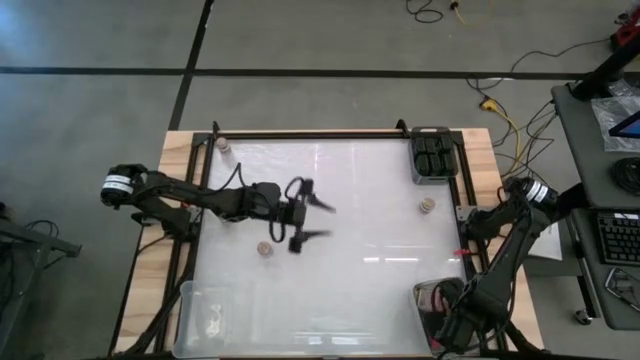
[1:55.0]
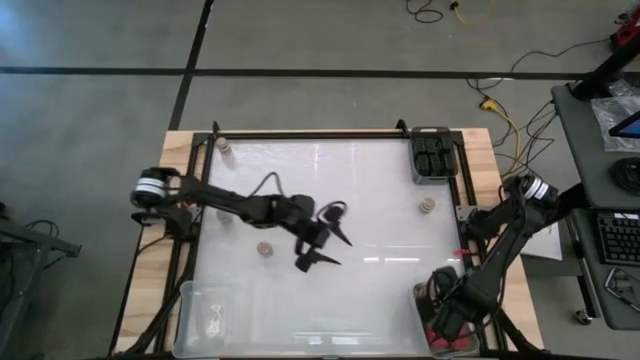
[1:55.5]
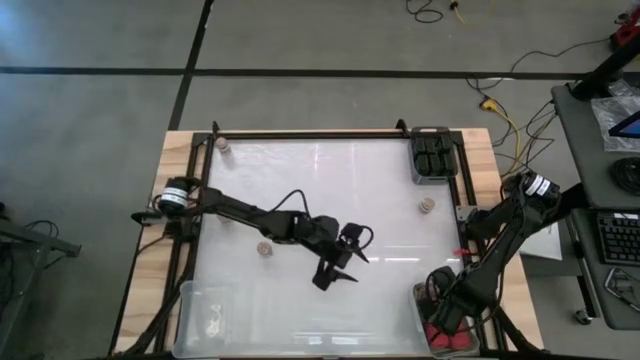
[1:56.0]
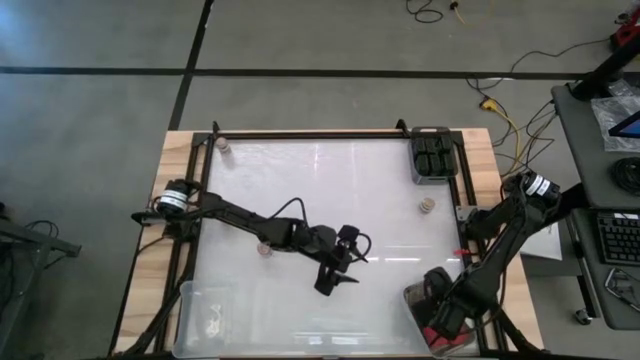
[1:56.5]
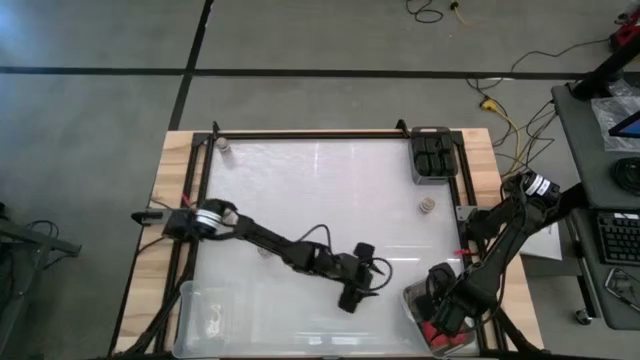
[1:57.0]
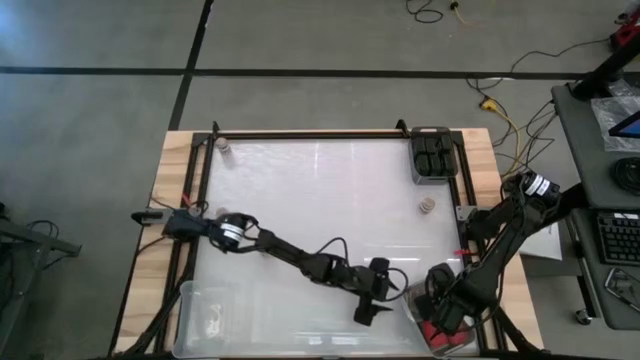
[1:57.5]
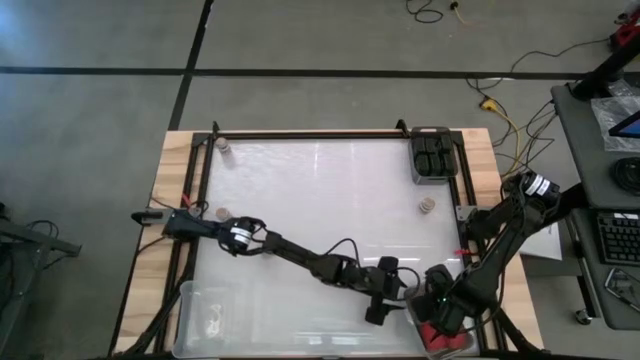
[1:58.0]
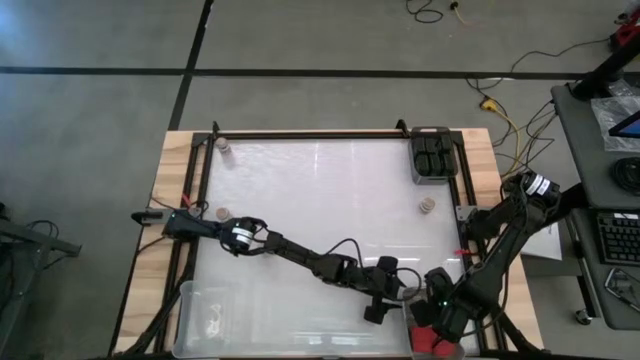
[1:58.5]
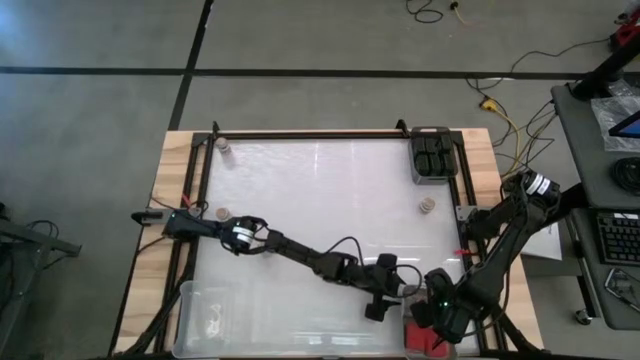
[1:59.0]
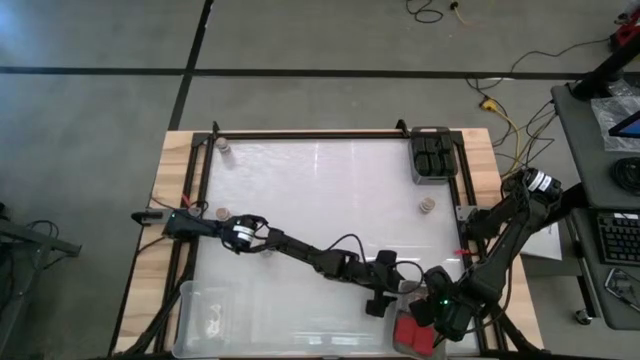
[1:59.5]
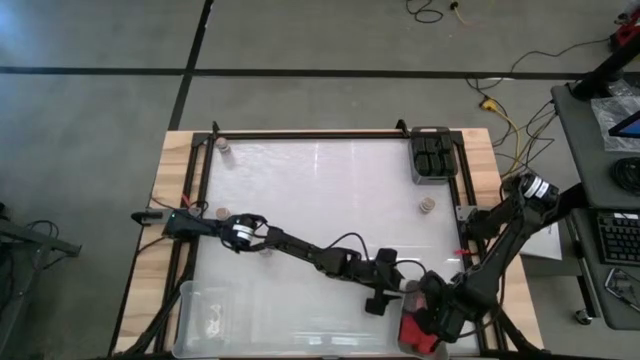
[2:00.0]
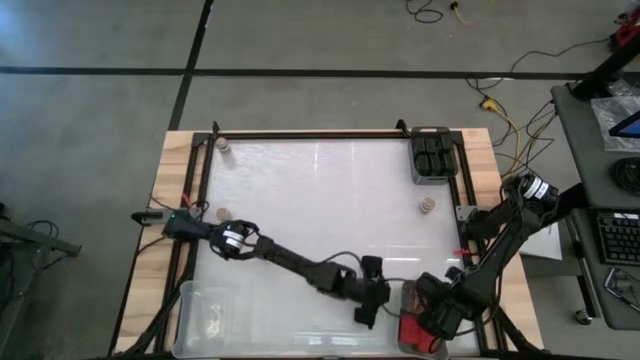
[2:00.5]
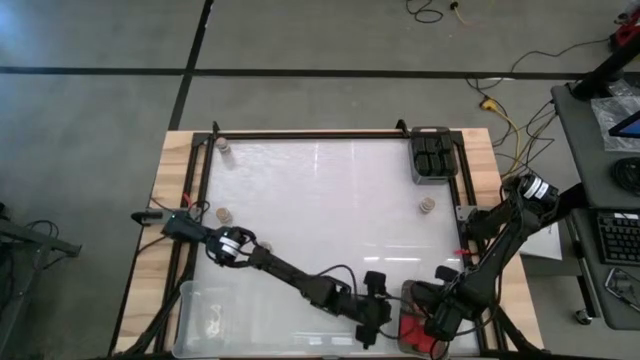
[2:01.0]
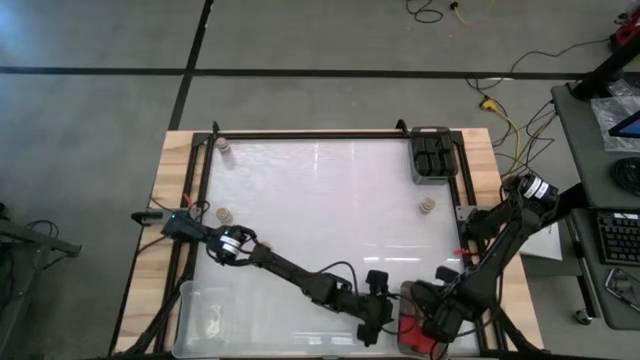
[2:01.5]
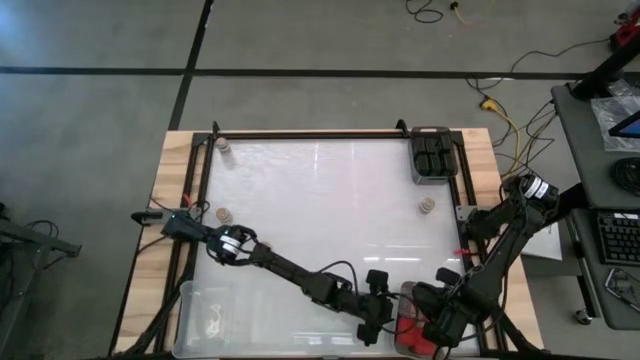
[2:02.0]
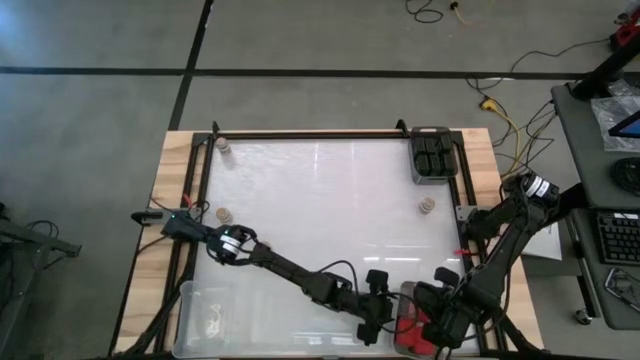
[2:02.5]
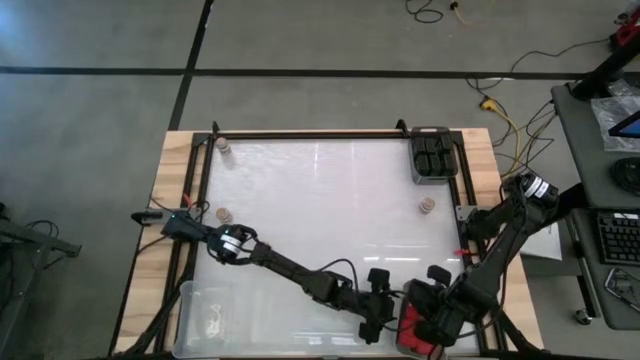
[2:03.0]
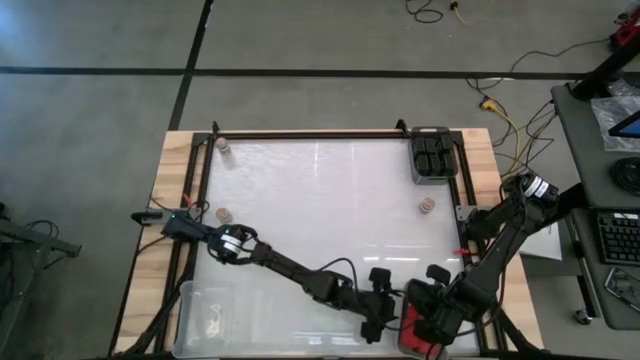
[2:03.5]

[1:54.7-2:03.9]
Task: Sort spices by type
Adjust the red seasoning can in the gray bin

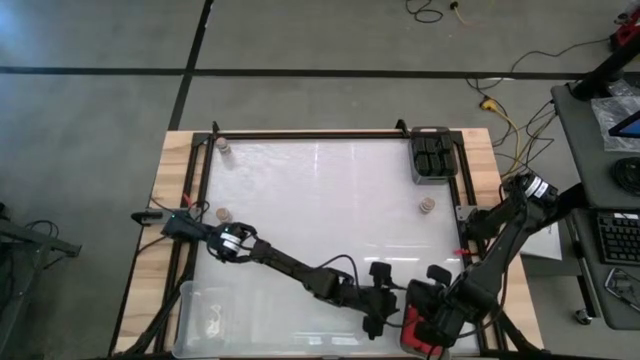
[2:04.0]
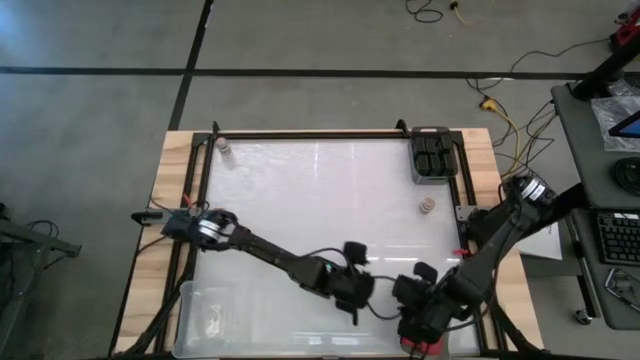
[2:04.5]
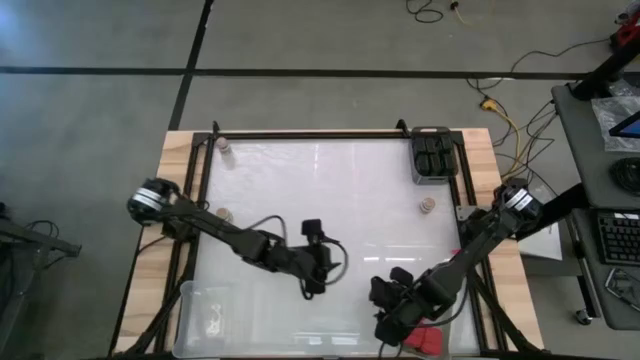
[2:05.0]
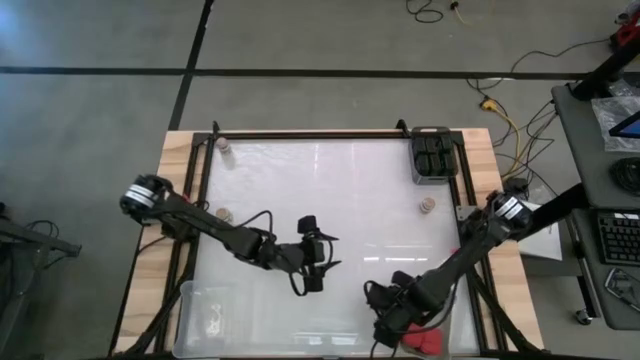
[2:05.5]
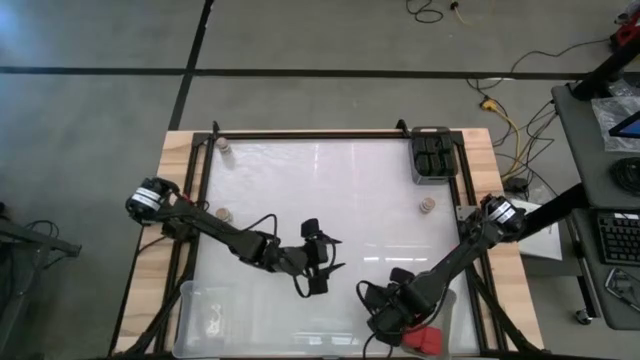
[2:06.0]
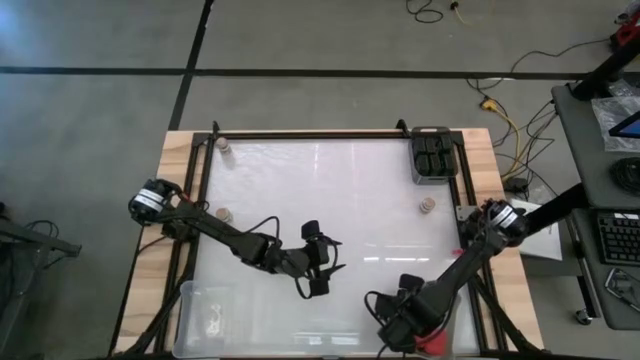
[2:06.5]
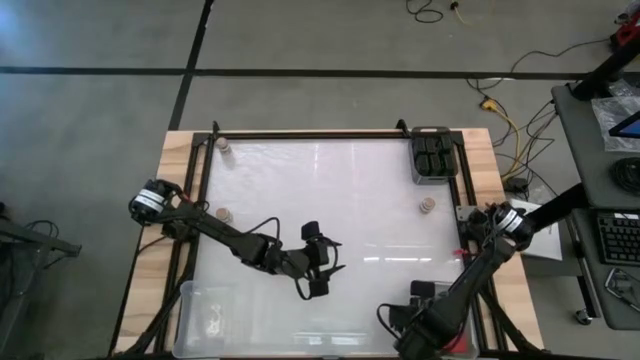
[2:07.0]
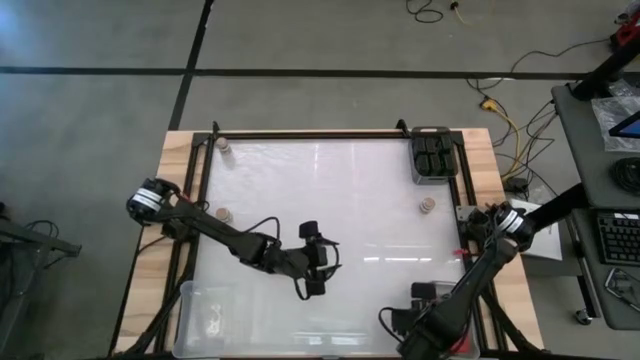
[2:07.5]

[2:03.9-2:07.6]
Adjust the gray bin

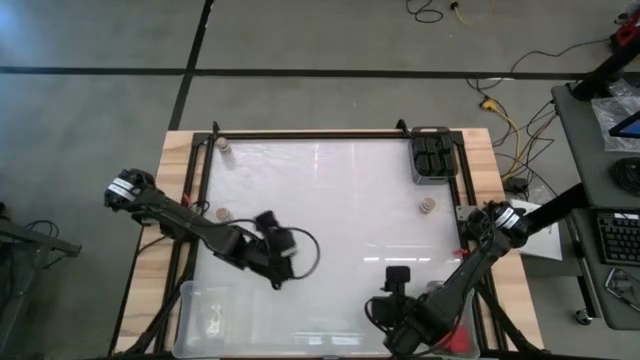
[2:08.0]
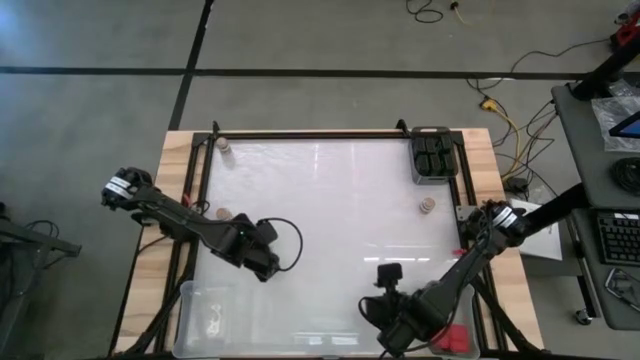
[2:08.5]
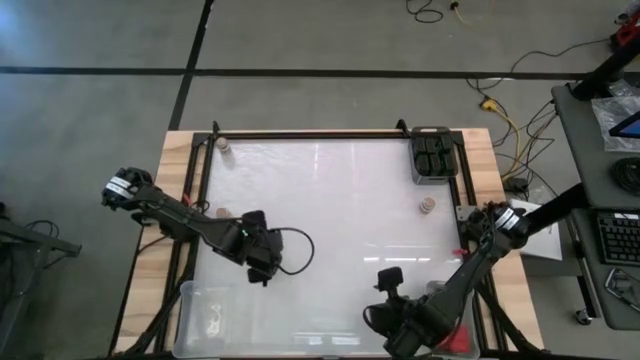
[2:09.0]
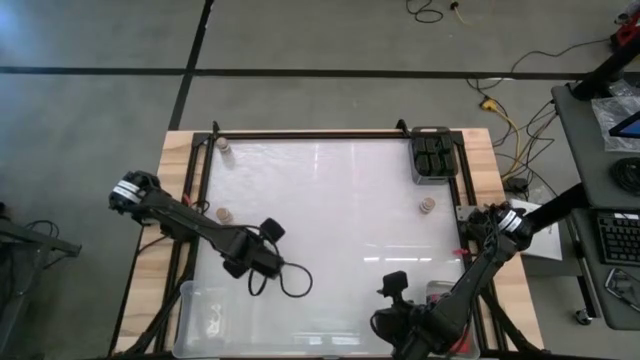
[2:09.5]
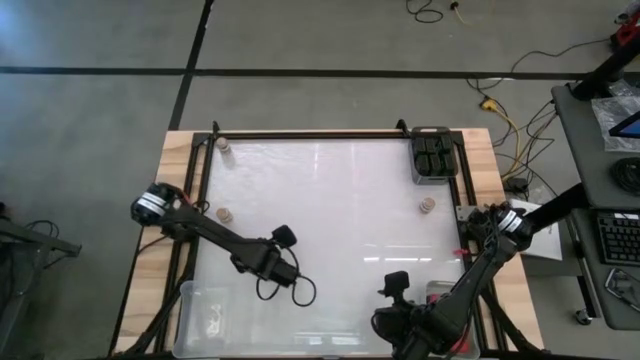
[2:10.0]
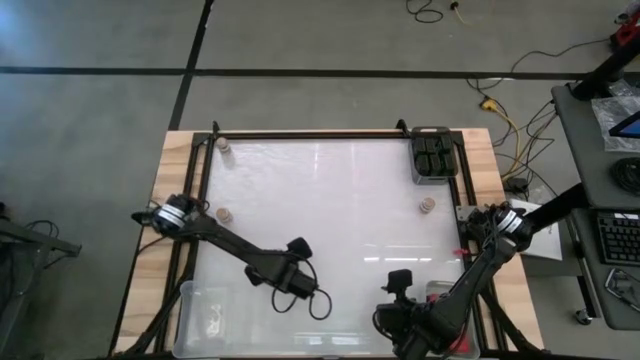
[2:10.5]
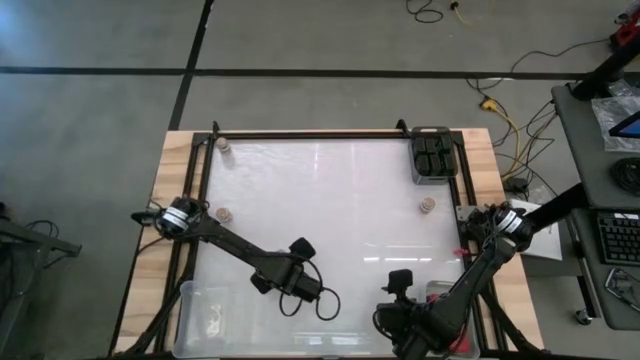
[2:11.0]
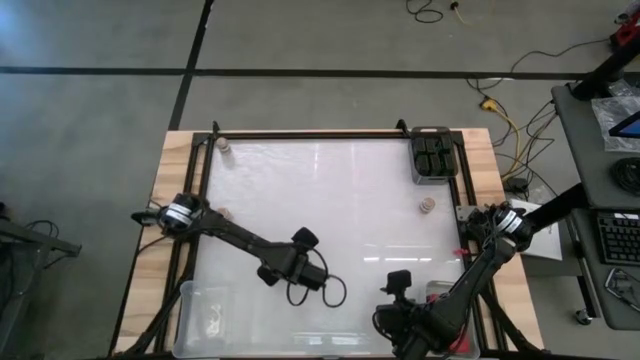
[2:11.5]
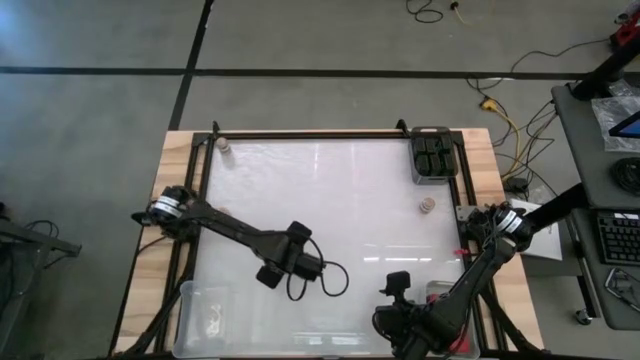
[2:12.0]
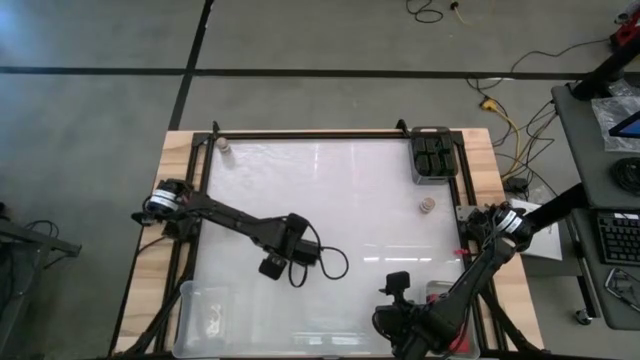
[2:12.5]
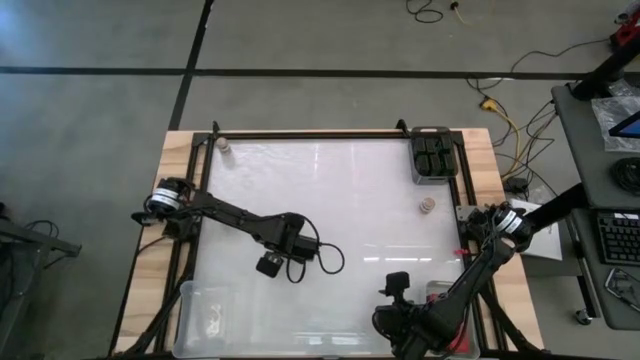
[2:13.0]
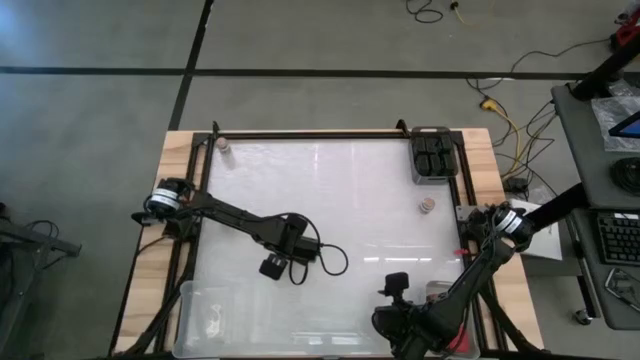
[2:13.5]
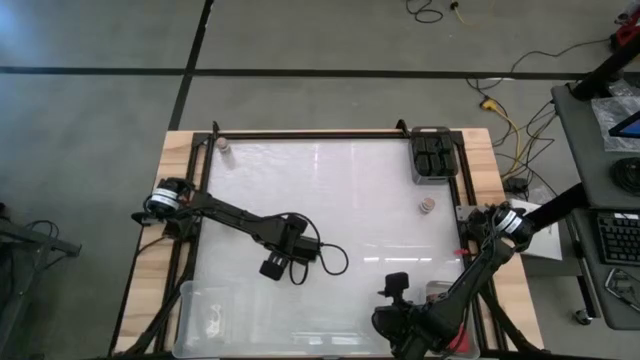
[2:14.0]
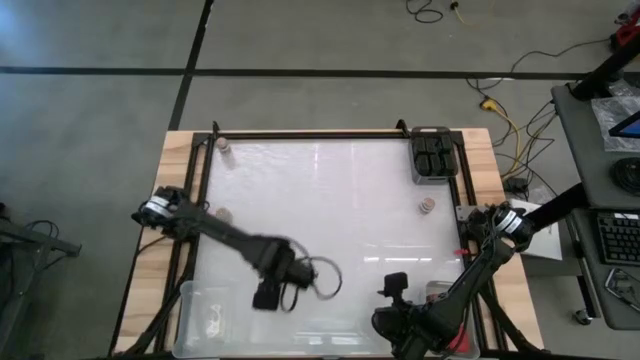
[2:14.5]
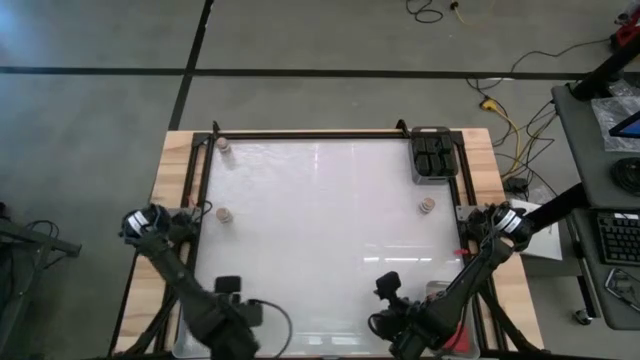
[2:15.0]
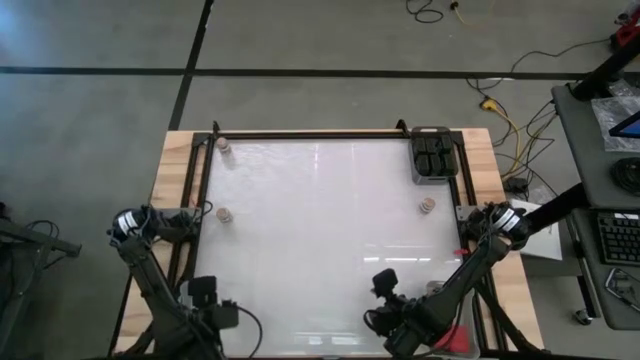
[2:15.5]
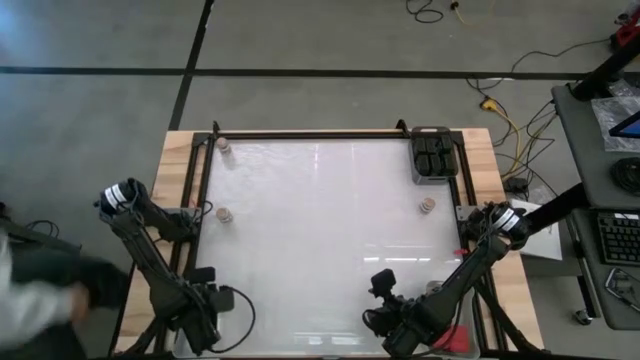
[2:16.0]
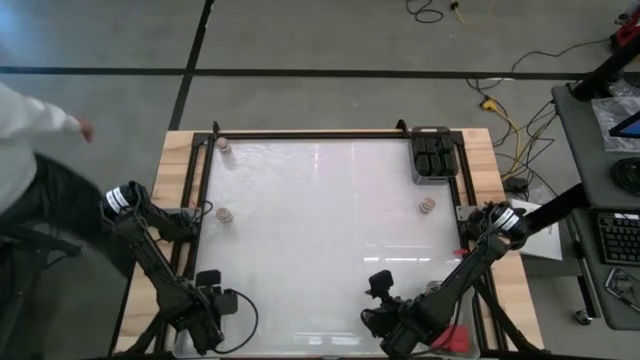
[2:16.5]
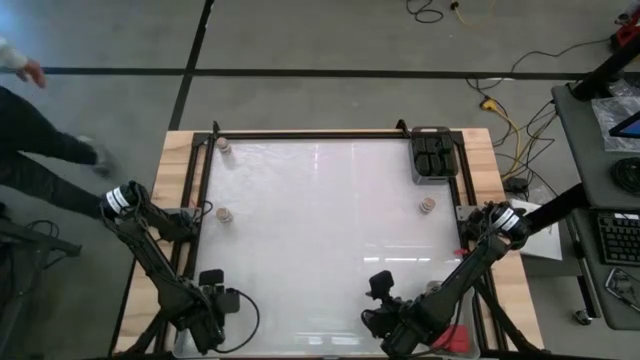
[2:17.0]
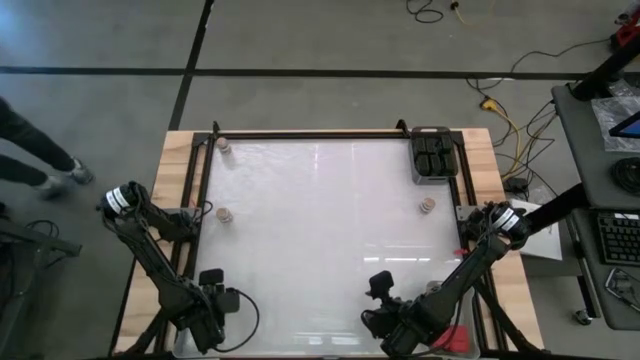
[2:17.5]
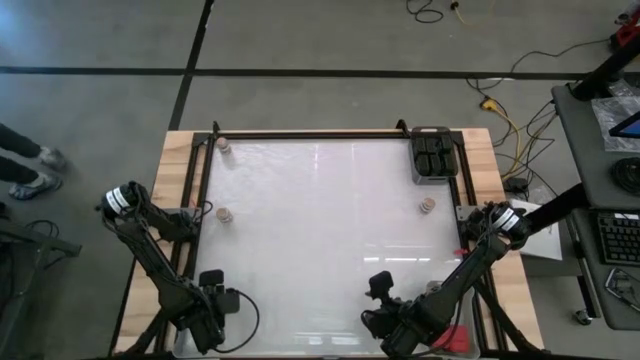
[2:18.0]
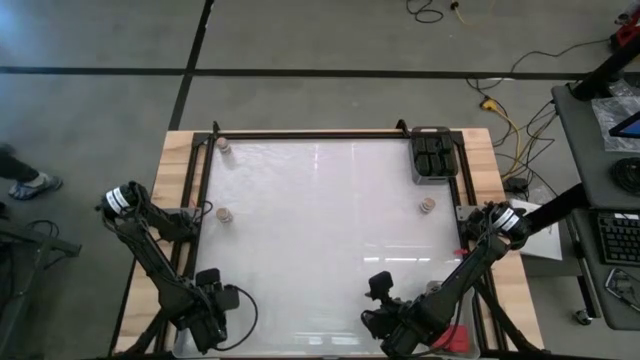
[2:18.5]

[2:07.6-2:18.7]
Put the brown seasoning bottle into the transparent bin
